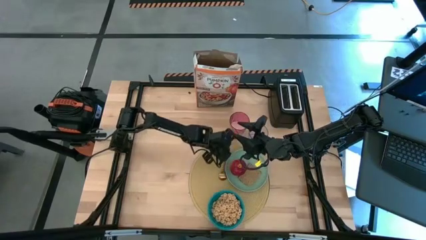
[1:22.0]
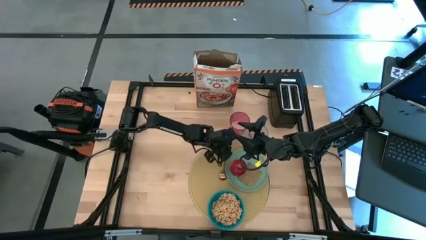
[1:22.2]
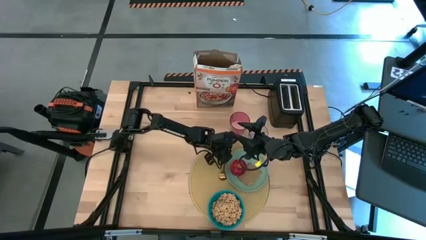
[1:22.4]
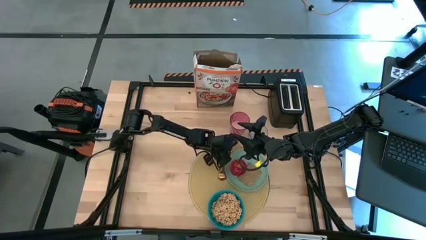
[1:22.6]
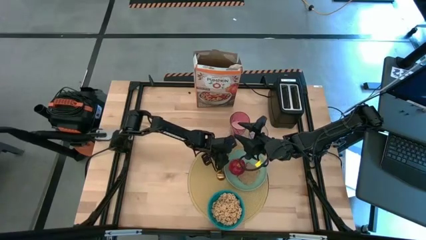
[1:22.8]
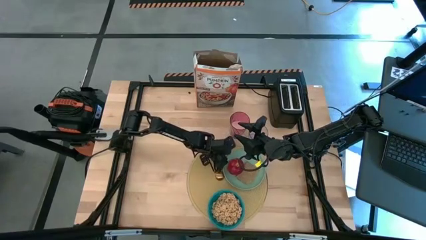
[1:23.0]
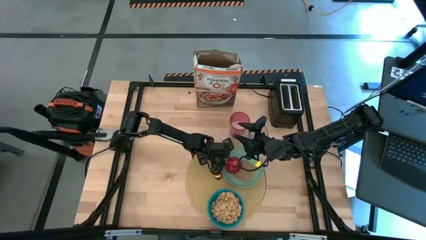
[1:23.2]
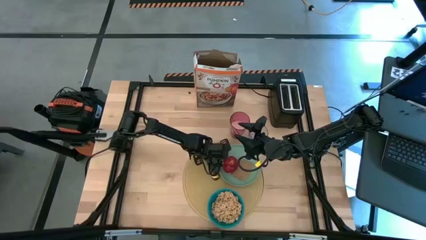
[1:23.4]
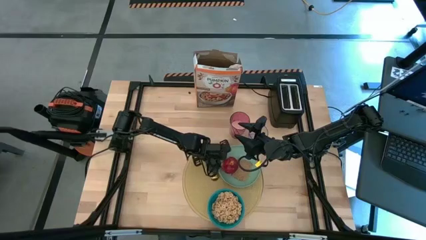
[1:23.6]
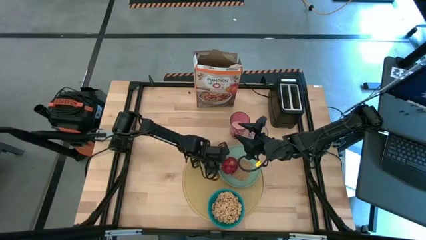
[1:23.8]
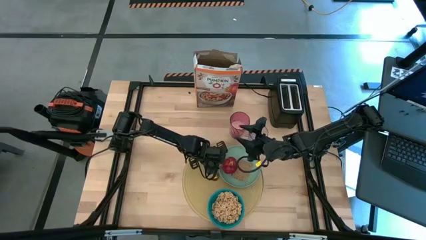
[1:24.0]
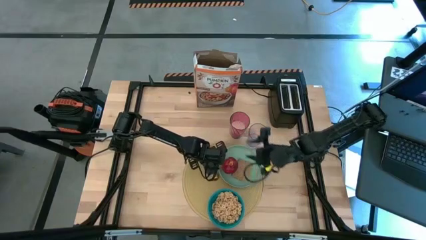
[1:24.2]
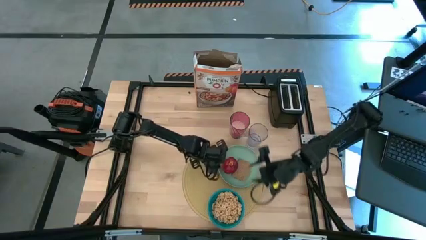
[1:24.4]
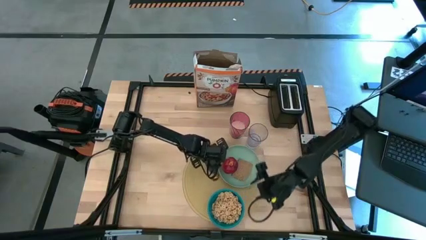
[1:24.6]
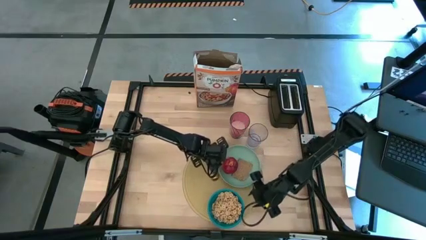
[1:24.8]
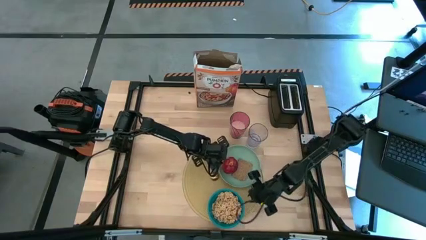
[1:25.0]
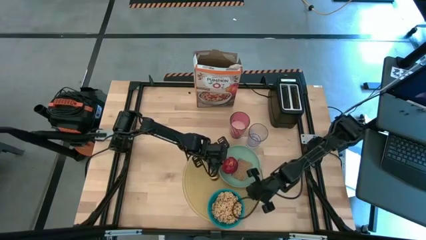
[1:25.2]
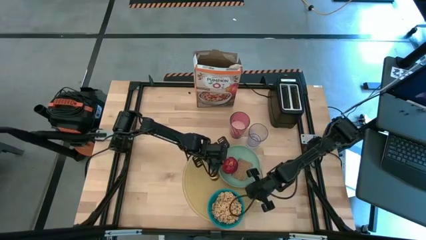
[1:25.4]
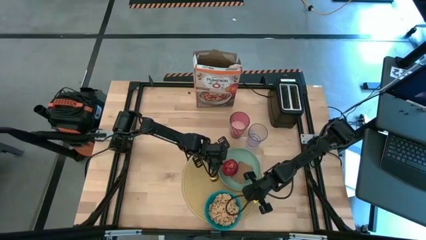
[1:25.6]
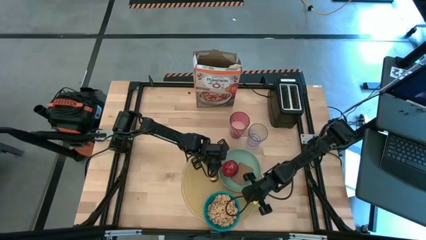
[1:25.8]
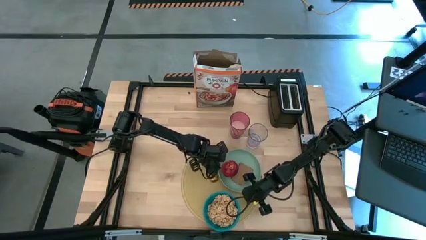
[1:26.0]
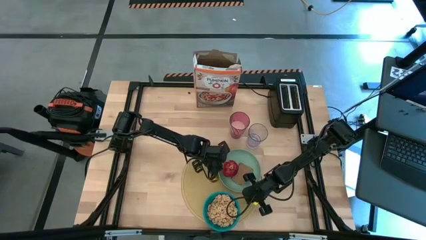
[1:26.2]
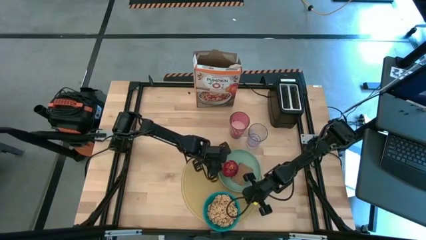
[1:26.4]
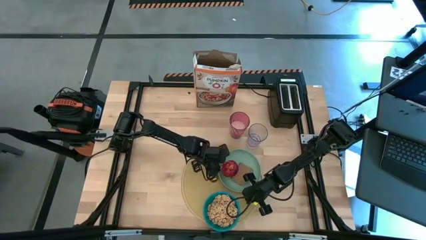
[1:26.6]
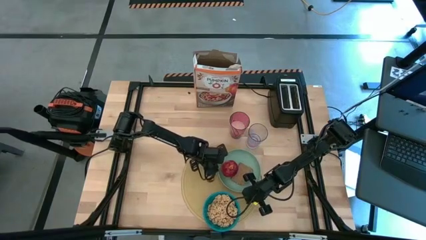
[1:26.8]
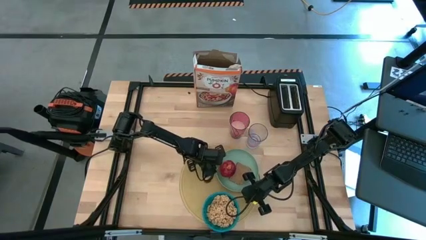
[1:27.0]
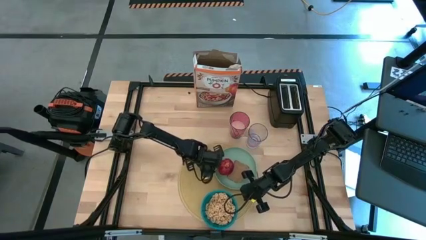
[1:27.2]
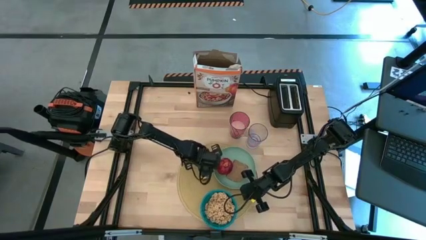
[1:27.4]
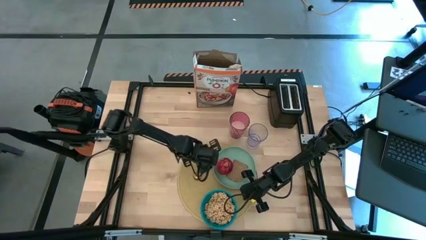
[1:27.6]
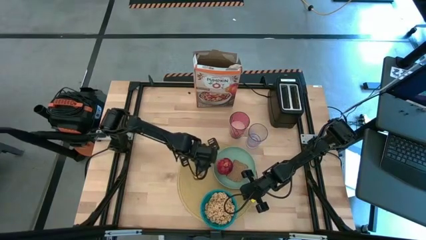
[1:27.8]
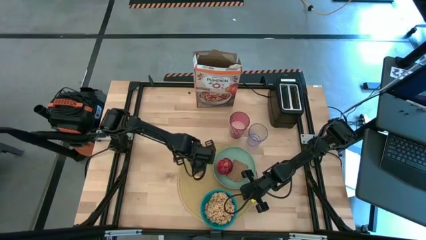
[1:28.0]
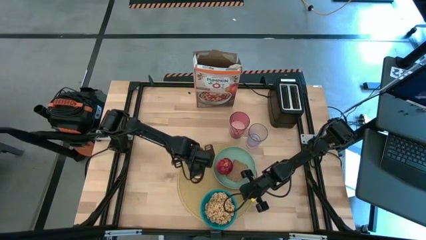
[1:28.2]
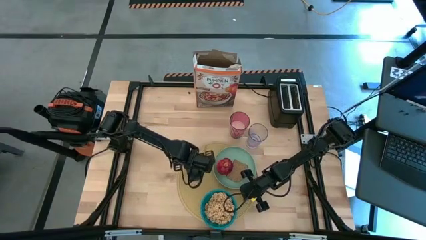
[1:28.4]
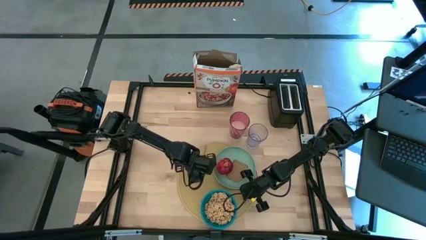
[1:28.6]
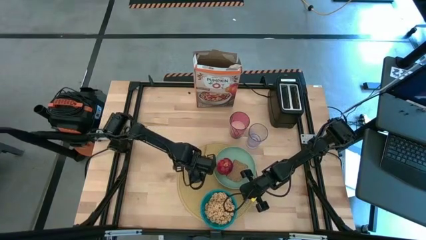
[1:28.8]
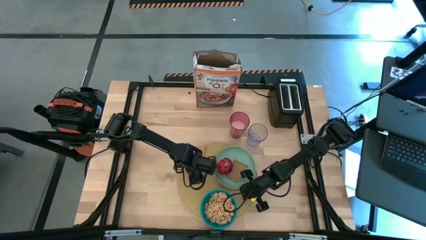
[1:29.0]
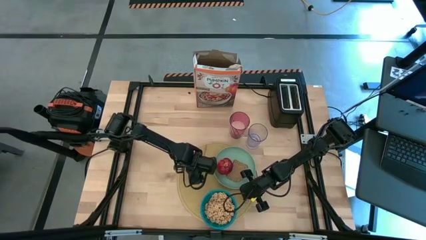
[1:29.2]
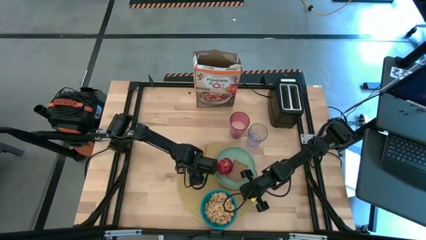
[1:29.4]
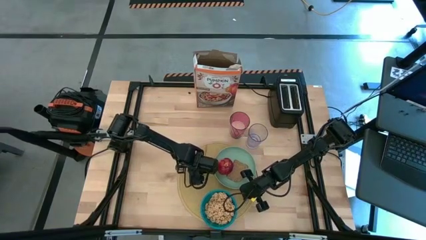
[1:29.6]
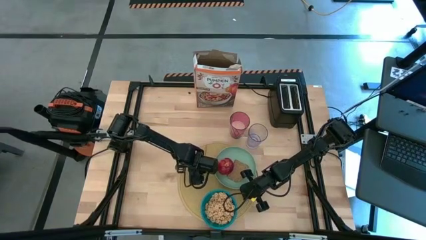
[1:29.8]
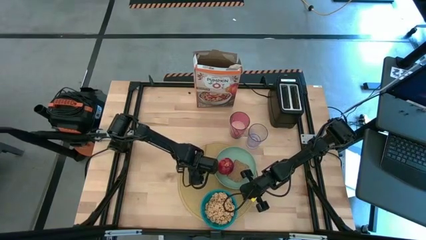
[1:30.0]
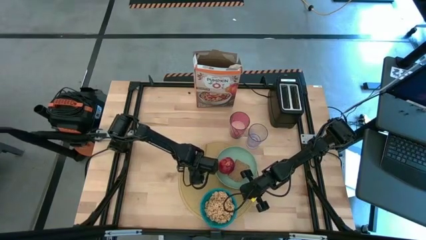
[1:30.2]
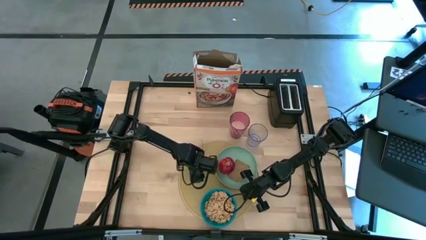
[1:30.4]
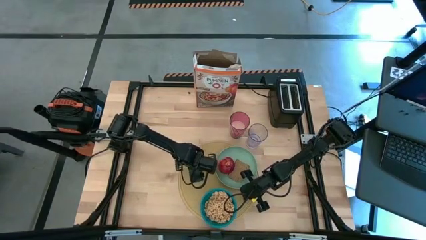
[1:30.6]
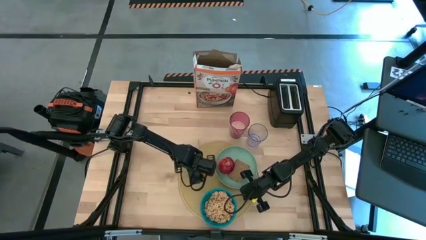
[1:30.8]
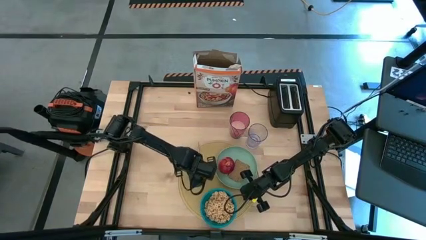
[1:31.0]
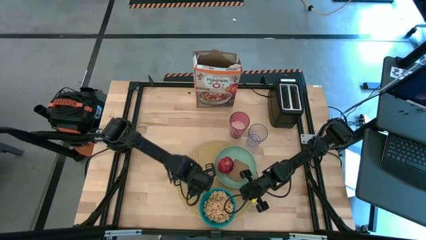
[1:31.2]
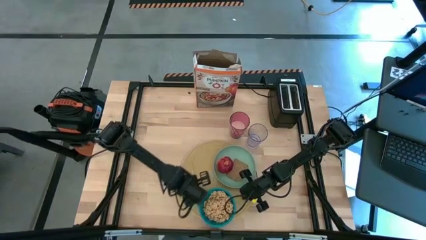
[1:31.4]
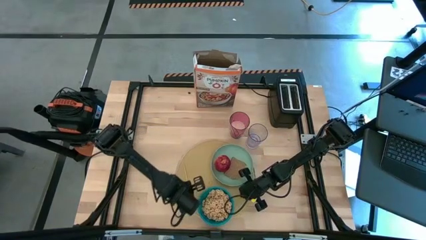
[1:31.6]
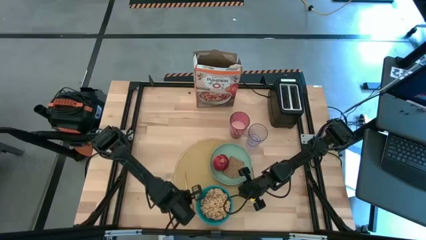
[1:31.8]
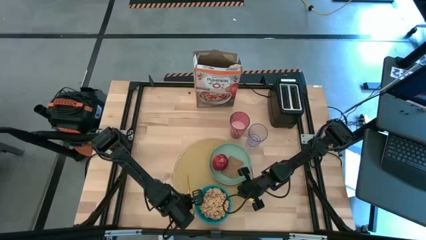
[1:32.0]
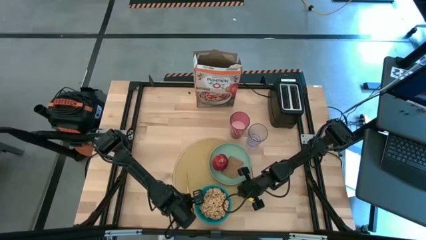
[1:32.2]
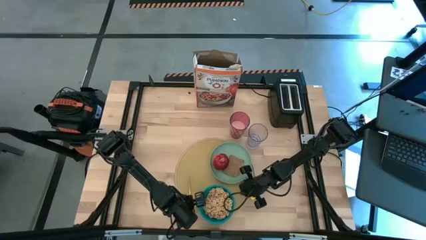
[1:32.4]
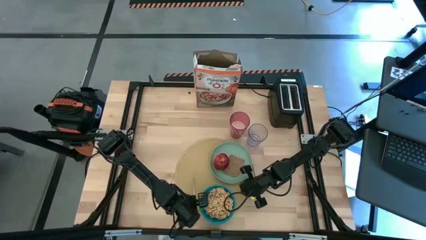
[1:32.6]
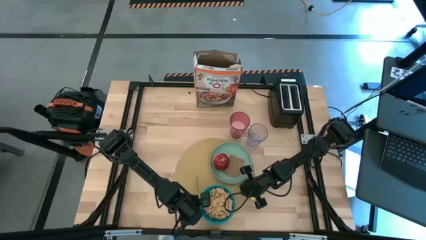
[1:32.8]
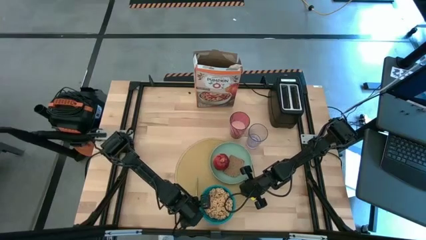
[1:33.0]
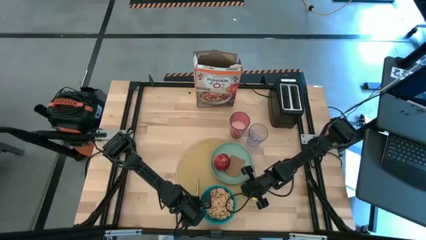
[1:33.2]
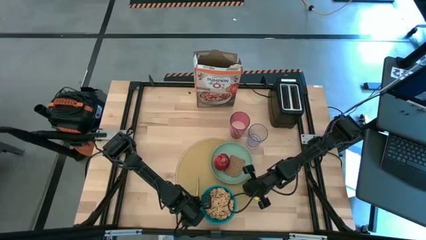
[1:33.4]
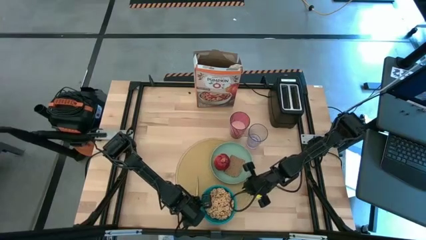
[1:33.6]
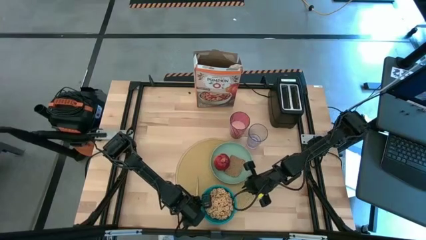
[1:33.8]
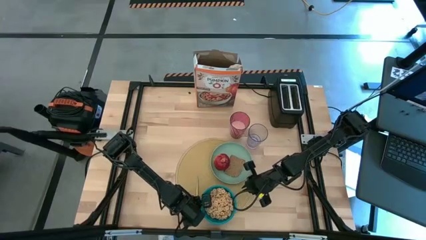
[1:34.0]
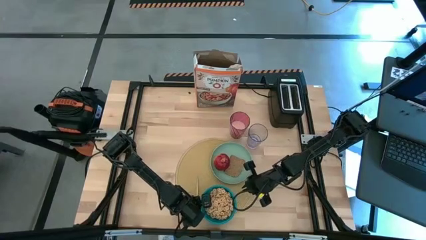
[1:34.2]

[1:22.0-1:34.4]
Task: Arrange a breakfast setting
Put the spoon on the brown table mat to the left side of the blue bowl

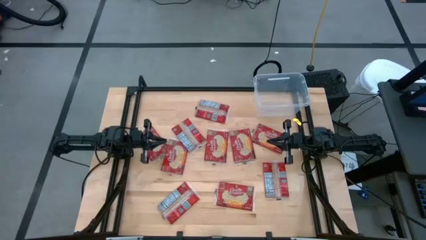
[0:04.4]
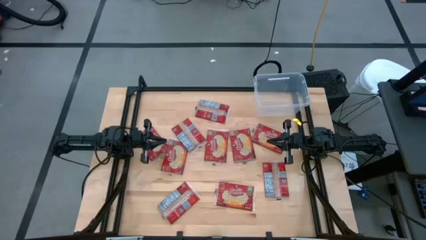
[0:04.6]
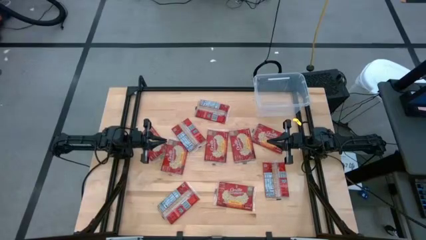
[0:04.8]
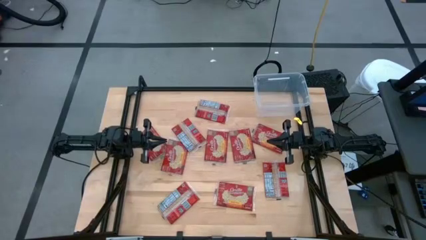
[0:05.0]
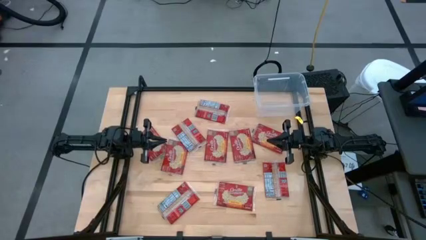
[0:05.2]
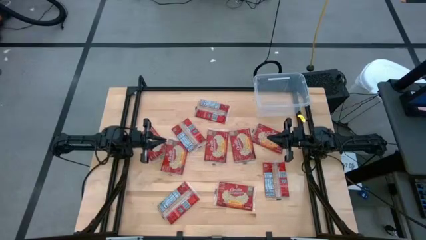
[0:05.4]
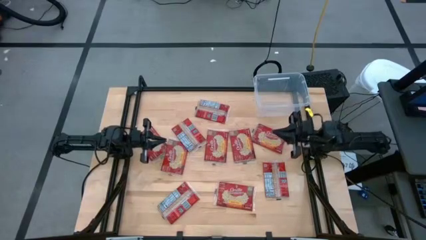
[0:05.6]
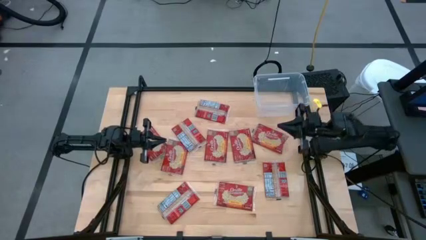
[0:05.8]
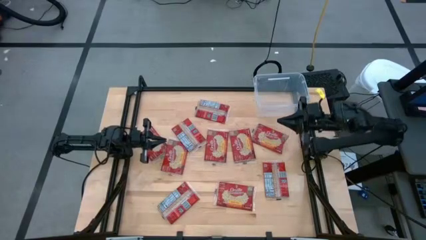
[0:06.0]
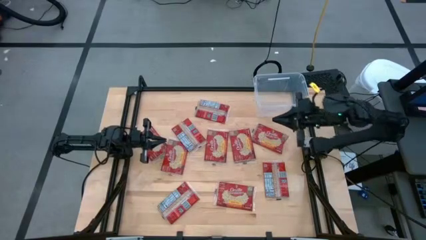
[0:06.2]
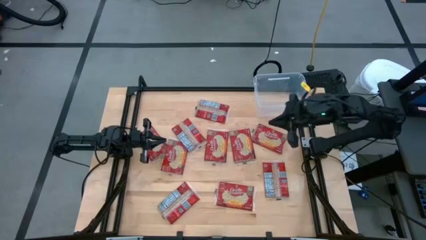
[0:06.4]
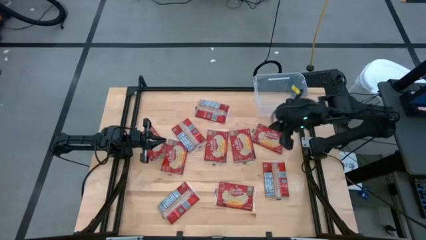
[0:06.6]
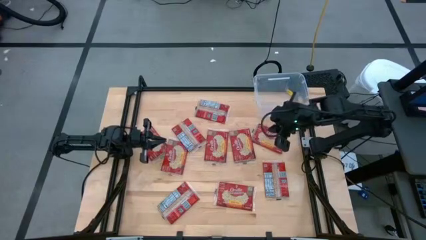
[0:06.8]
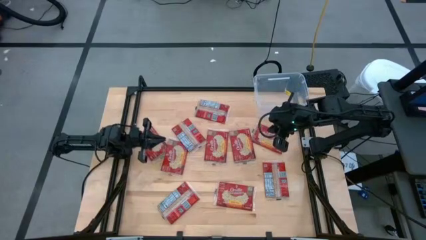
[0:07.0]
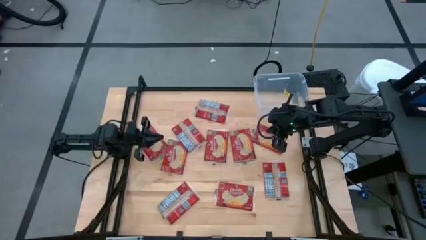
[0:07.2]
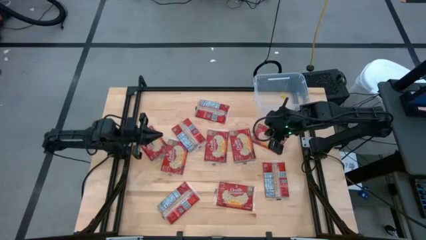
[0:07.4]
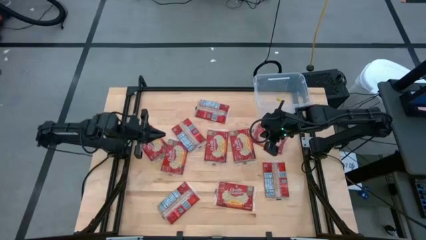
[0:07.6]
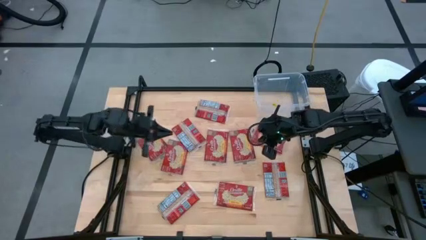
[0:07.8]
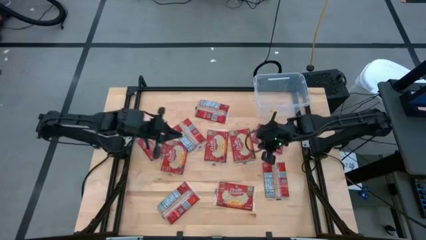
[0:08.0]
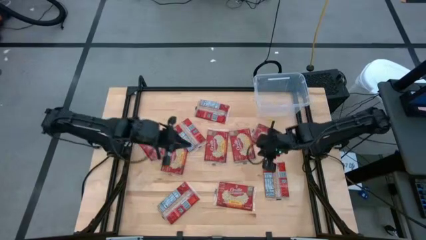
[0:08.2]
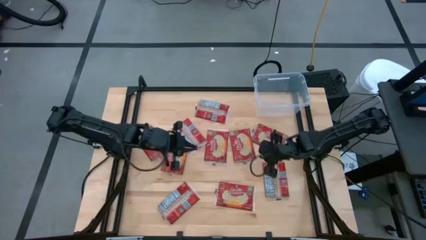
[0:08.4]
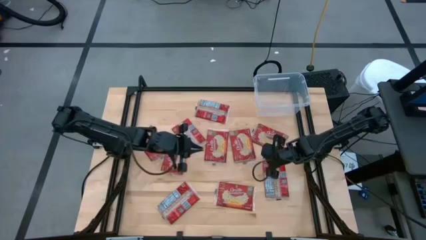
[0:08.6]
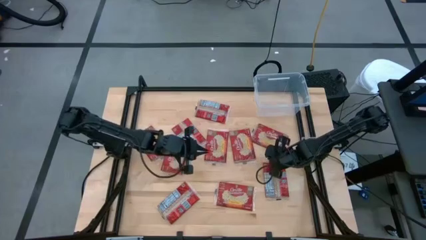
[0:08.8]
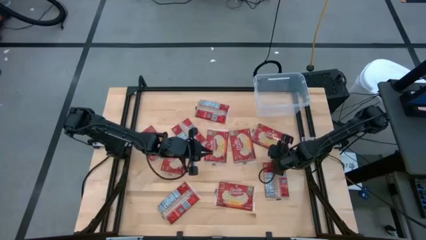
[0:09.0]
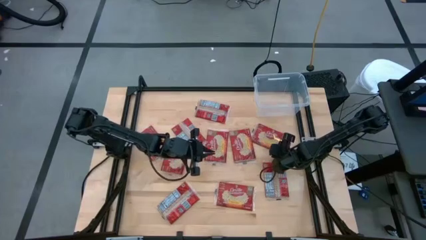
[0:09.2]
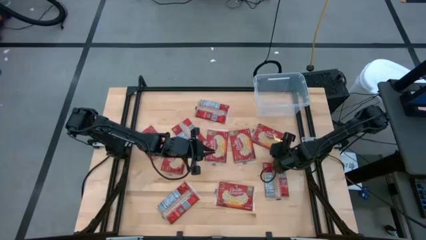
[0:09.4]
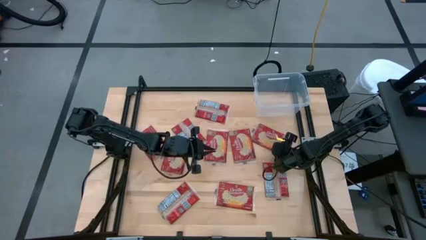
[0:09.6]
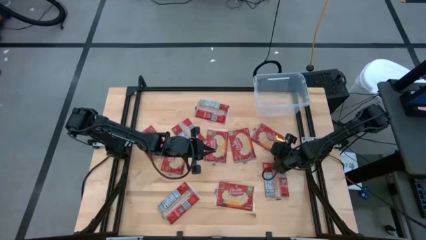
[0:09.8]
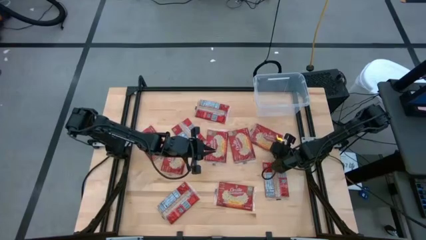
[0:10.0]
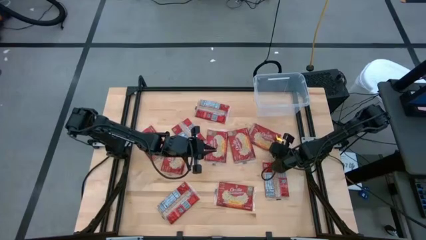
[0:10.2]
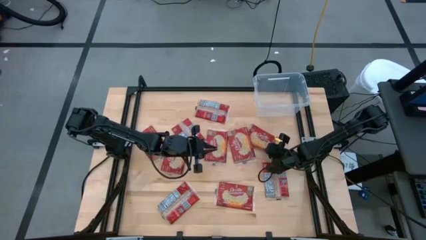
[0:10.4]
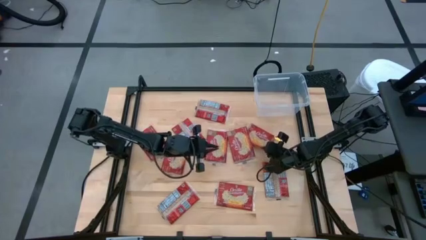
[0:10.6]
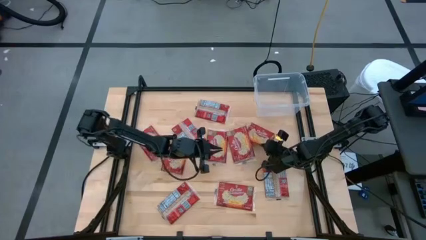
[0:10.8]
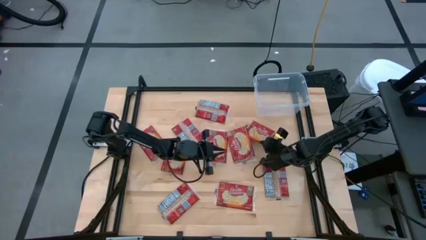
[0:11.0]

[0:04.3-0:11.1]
Task: Sort popcorn bags into baskets
Put the popcorn bag into the transparent container
